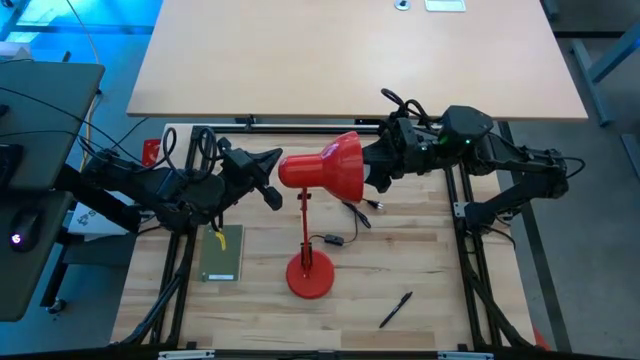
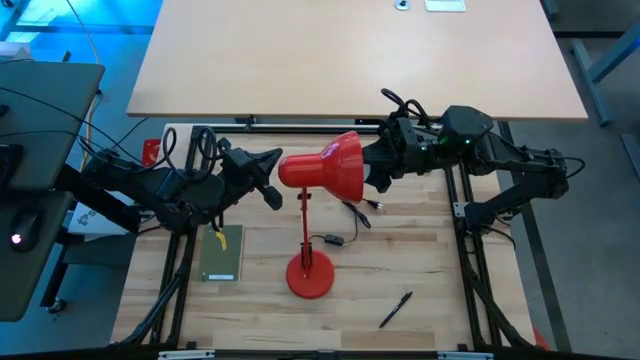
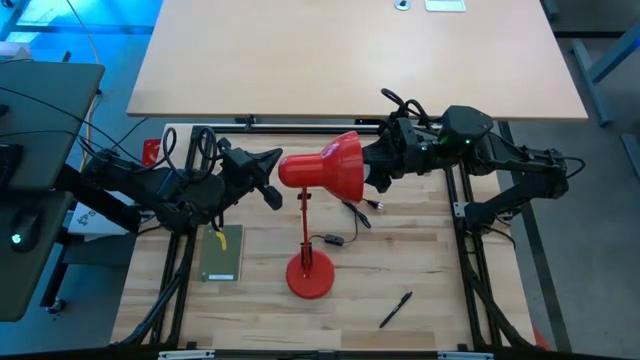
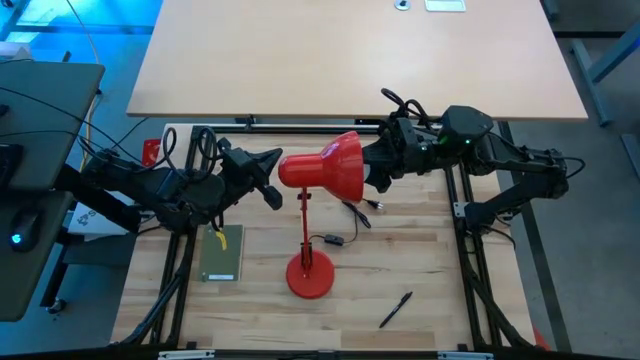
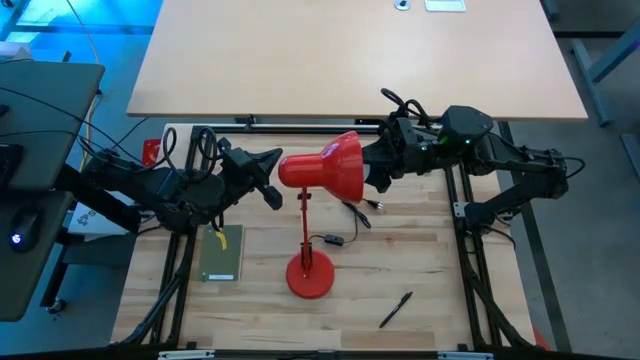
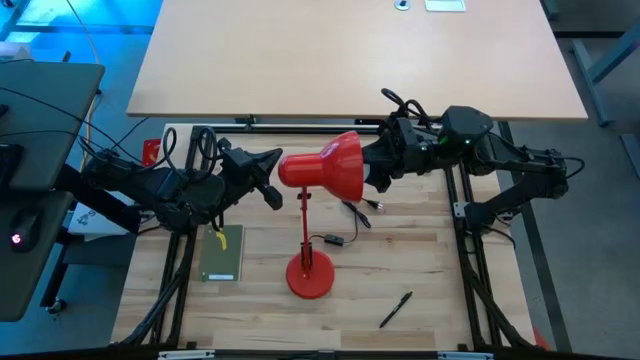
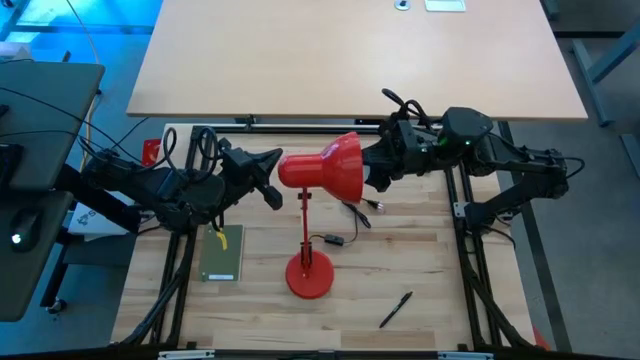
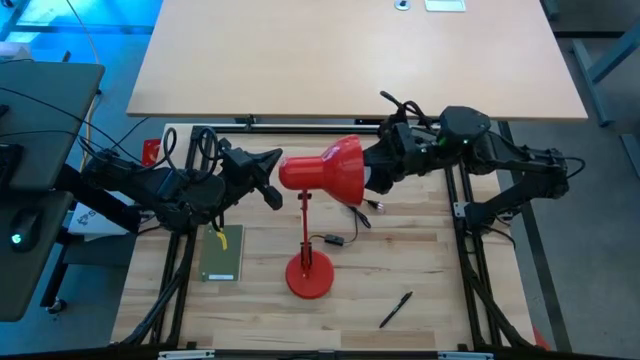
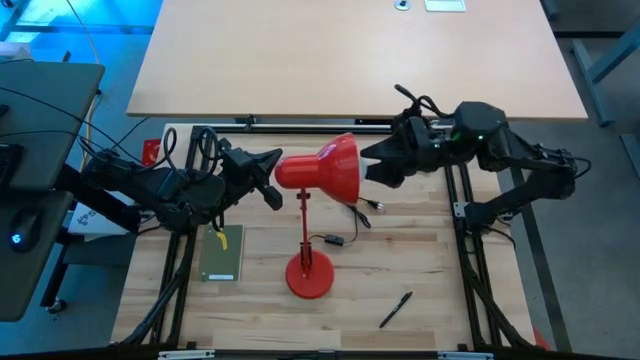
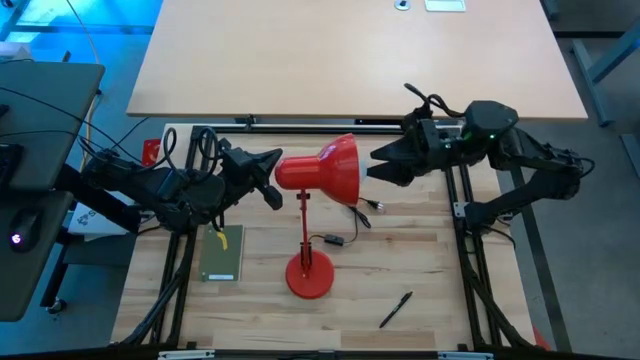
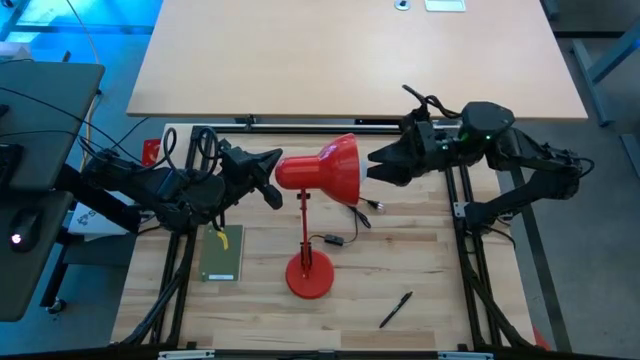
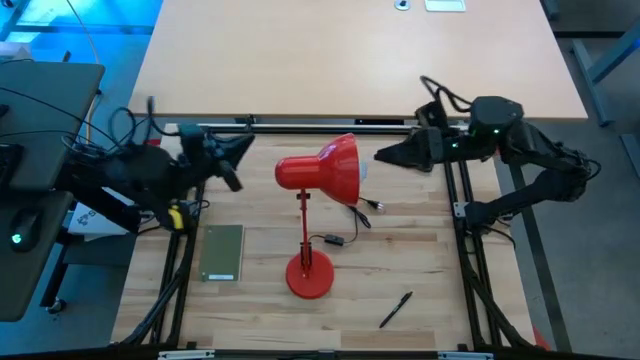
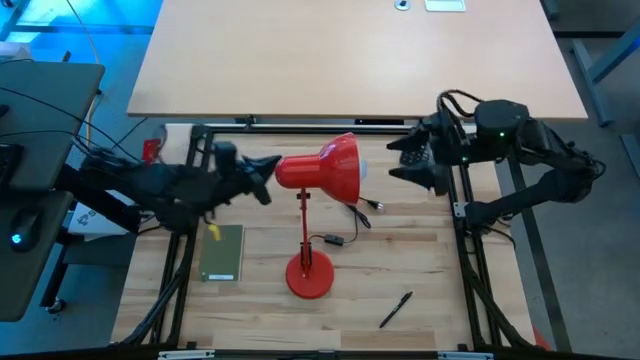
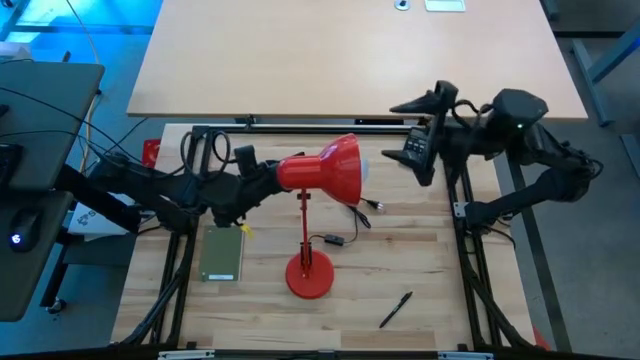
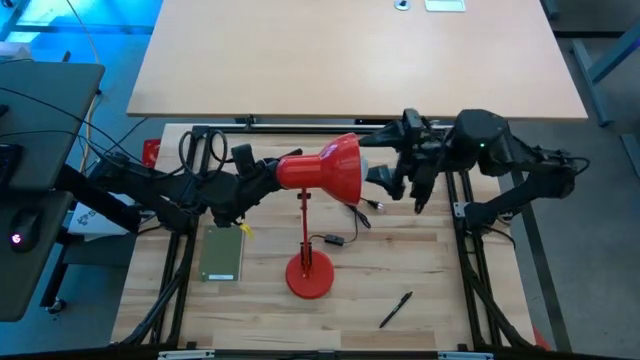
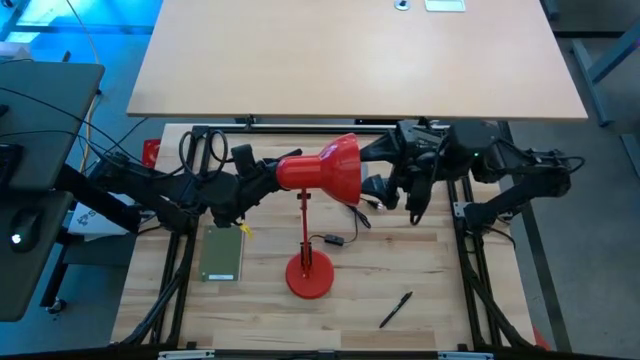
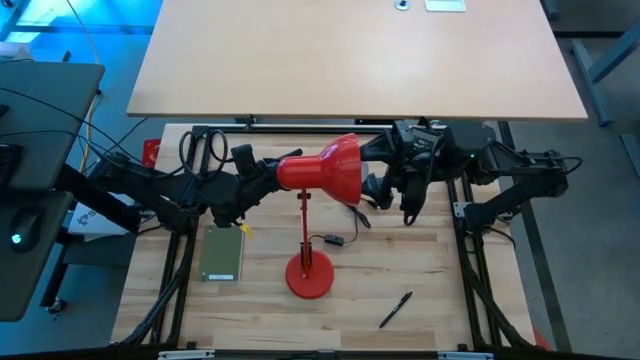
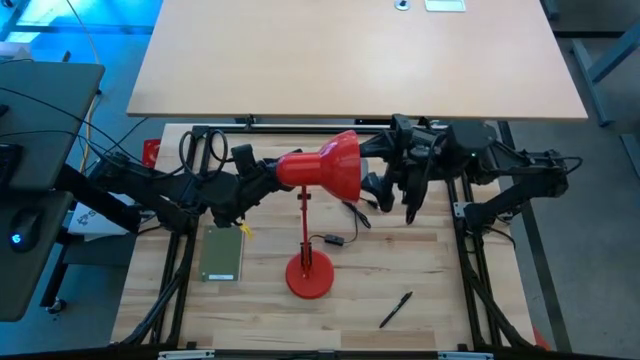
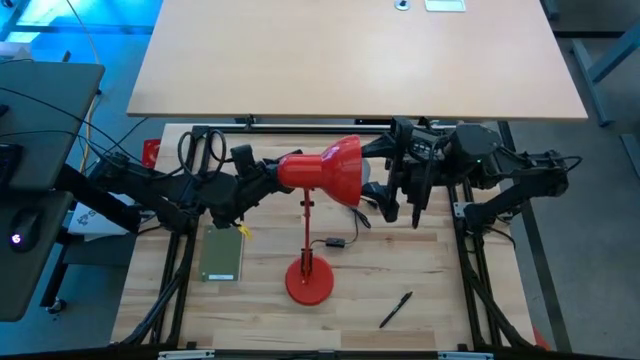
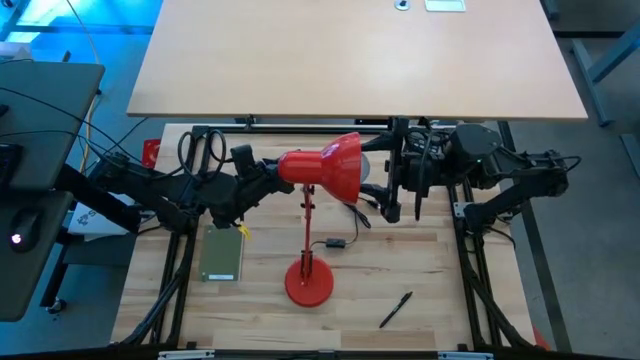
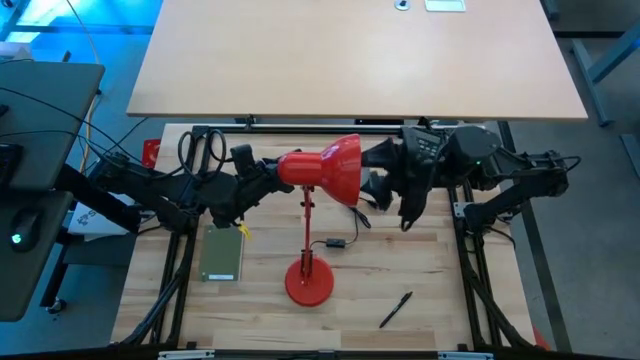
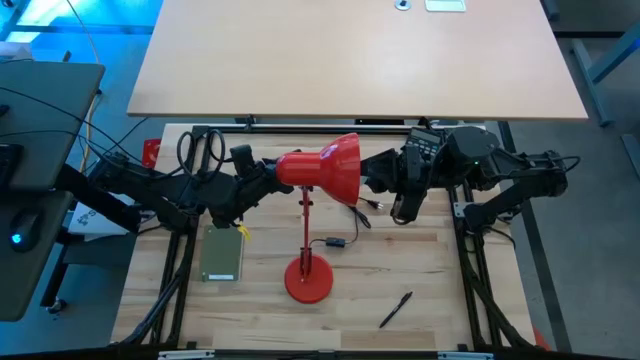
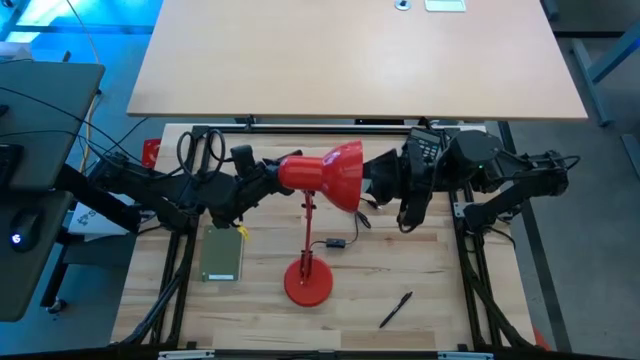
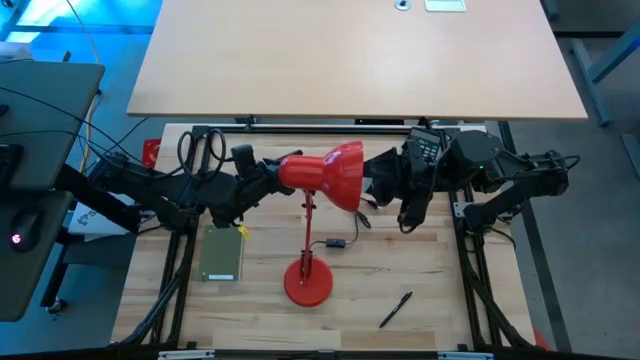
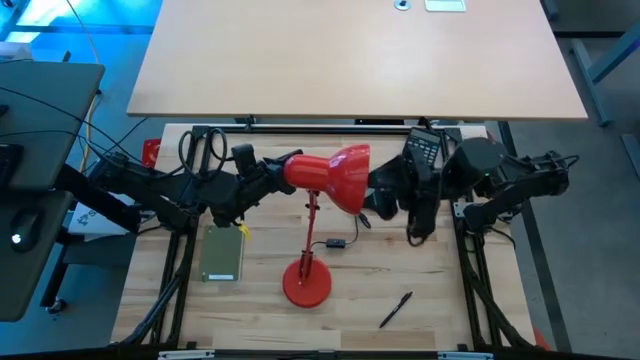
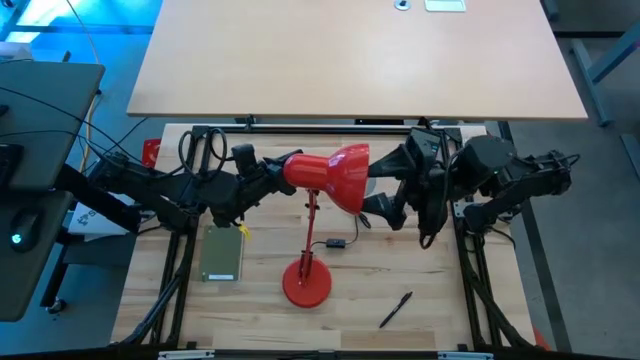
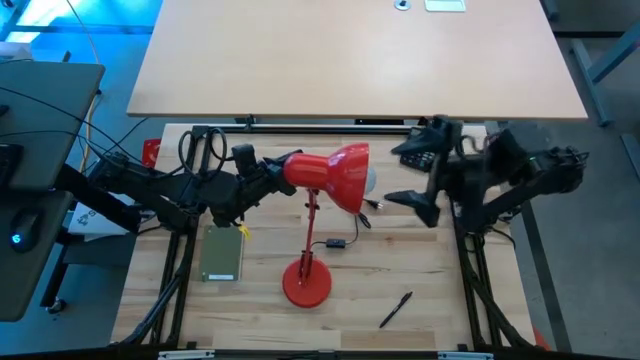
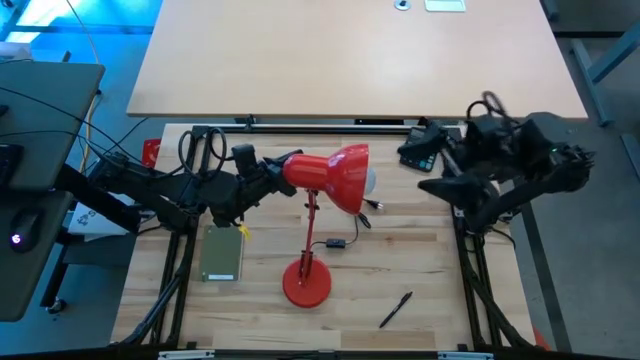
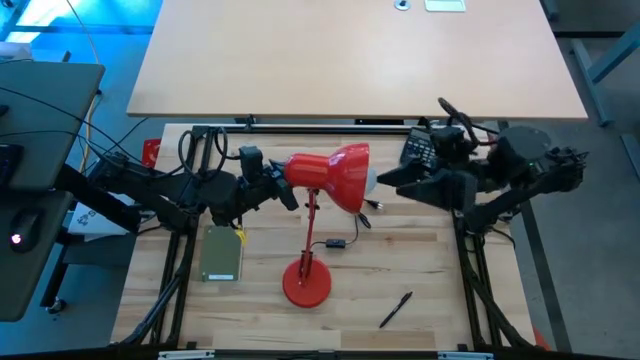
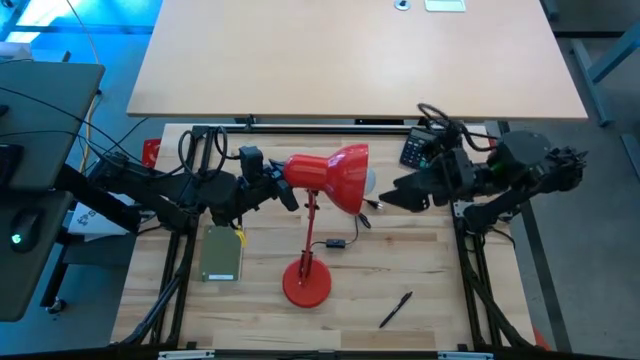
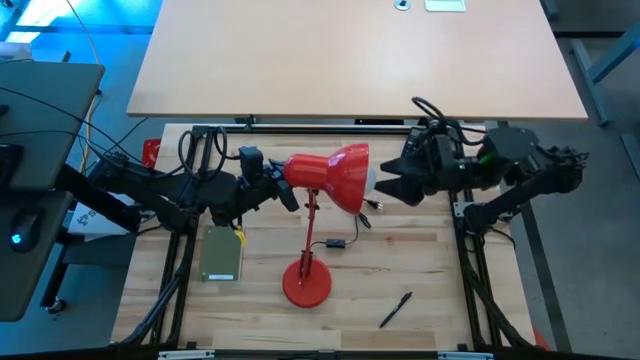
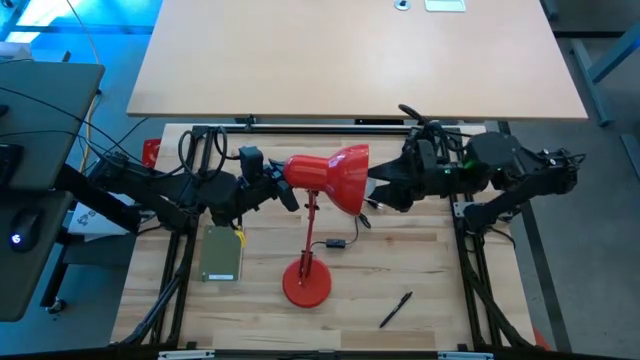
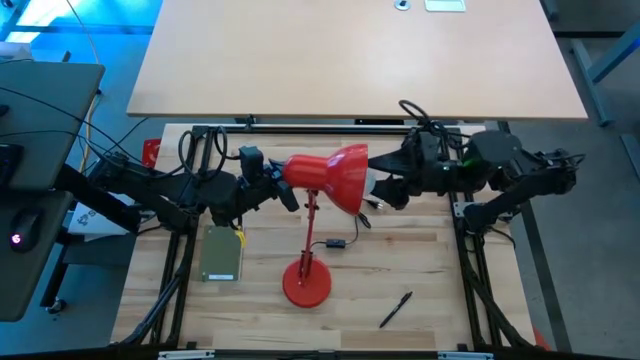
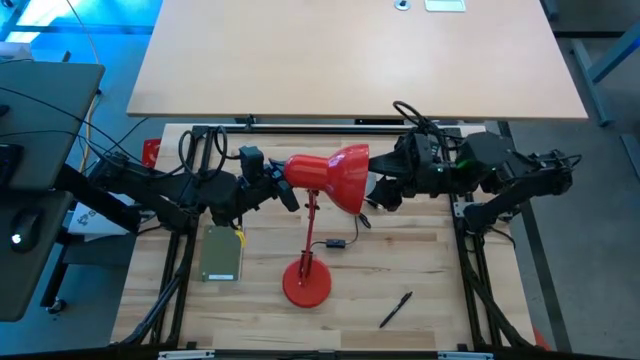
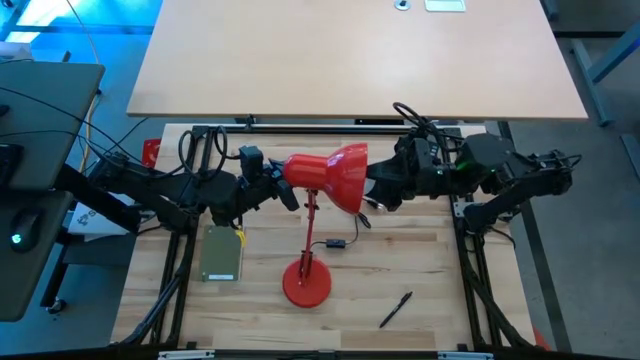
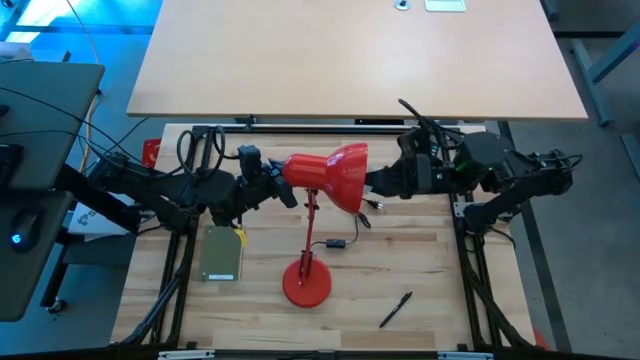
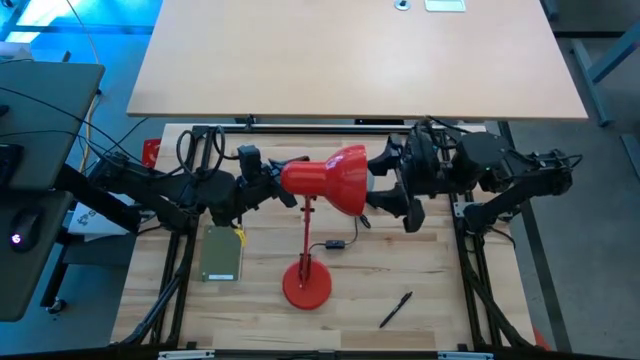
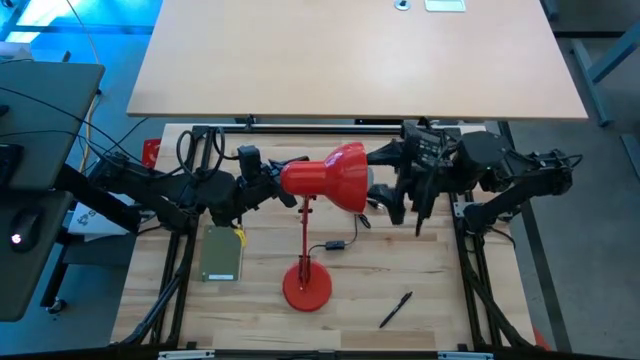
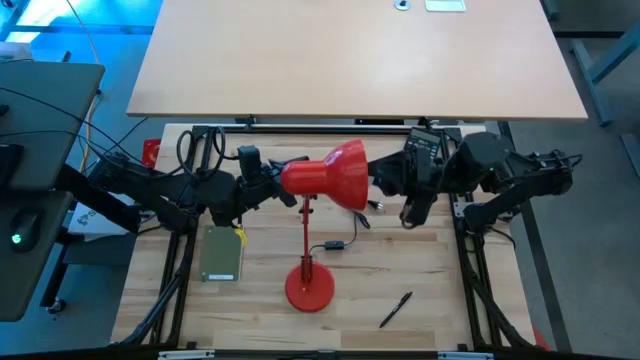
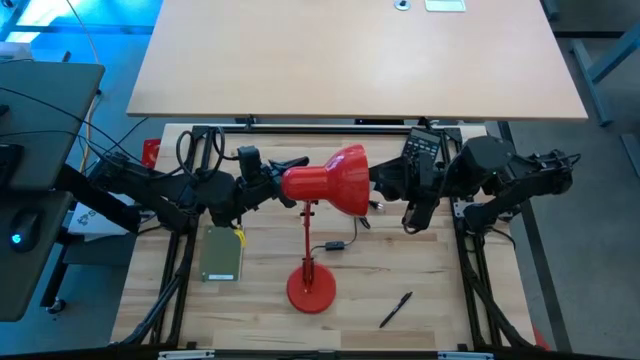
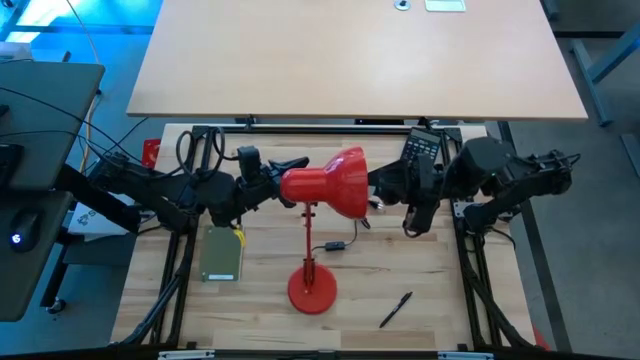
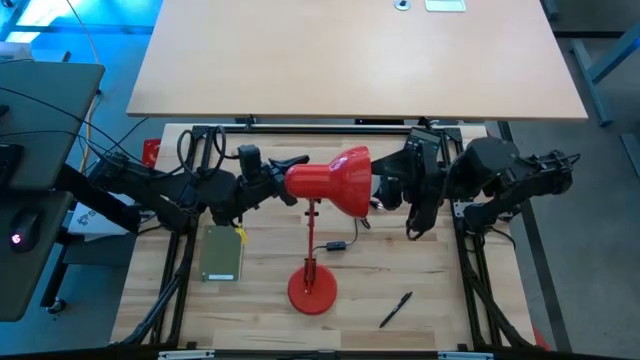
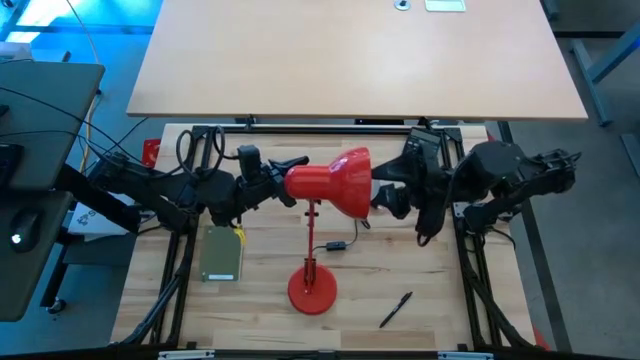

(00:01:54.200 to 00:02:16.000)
Task: Screw lightbulb
Insert the white lightbulb into the red lamp
